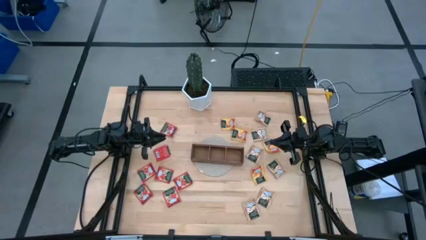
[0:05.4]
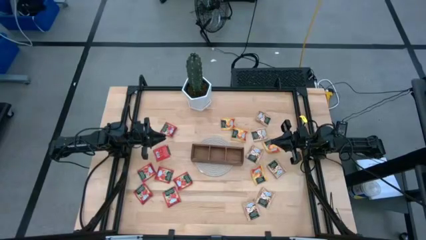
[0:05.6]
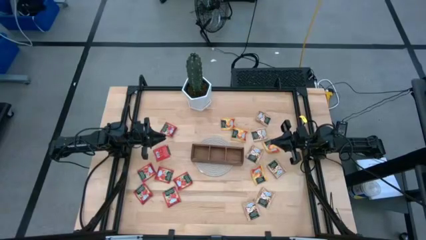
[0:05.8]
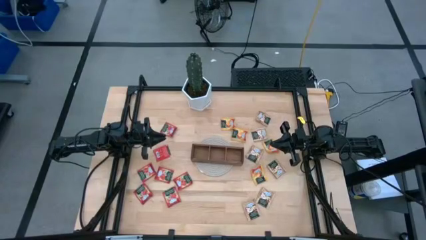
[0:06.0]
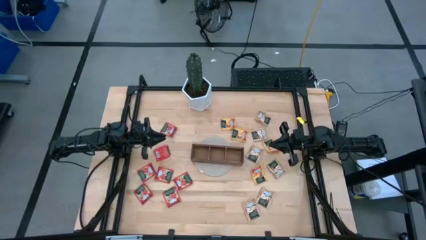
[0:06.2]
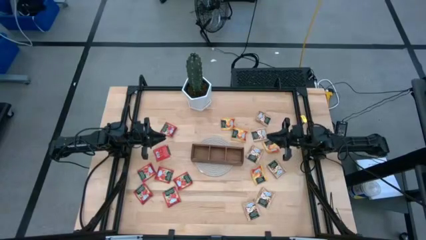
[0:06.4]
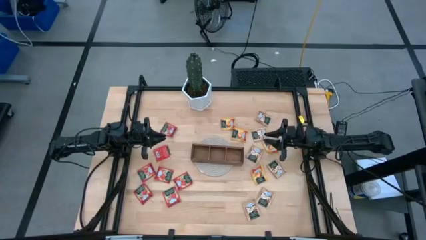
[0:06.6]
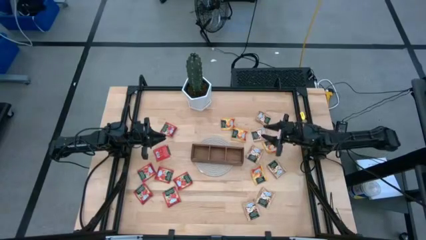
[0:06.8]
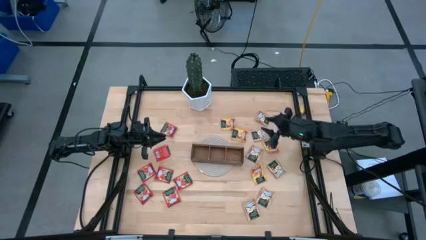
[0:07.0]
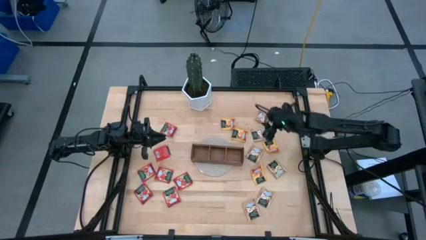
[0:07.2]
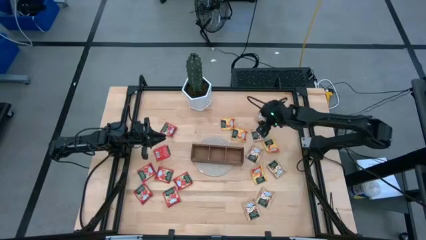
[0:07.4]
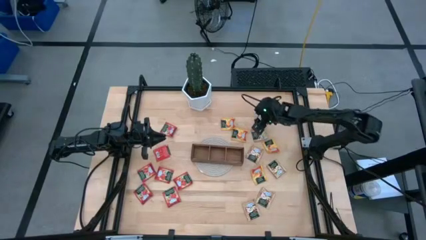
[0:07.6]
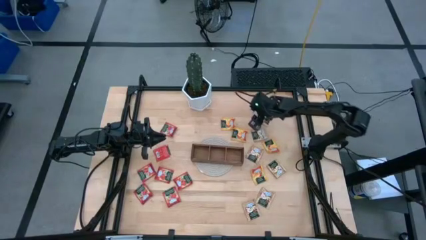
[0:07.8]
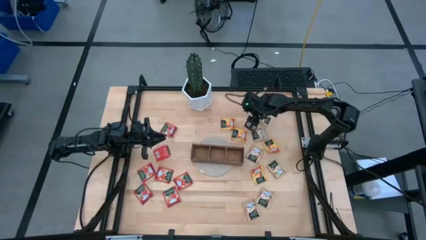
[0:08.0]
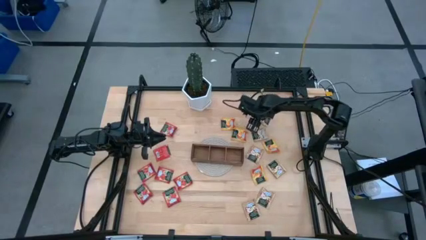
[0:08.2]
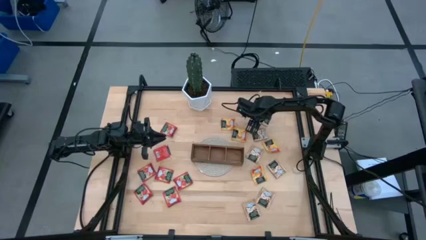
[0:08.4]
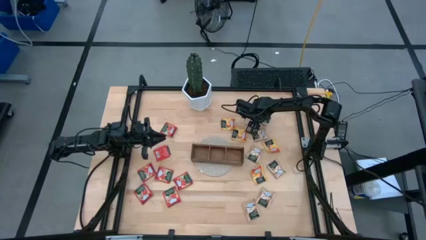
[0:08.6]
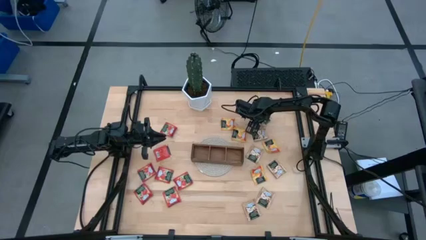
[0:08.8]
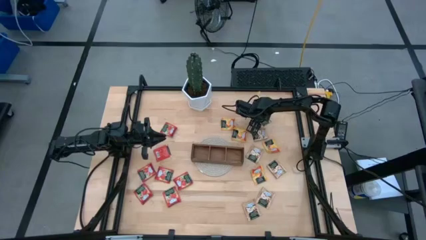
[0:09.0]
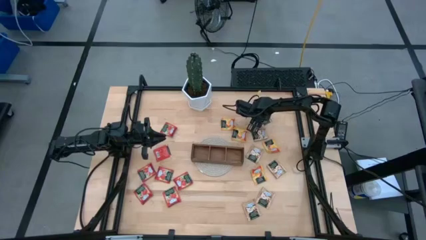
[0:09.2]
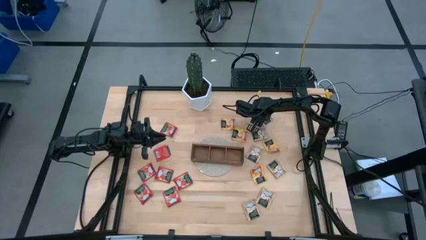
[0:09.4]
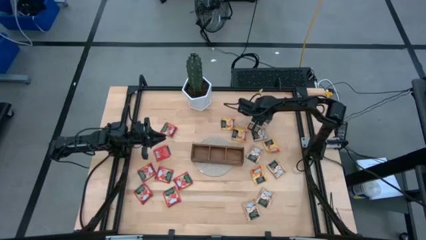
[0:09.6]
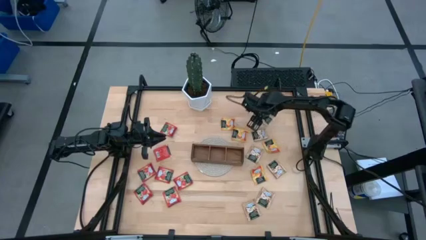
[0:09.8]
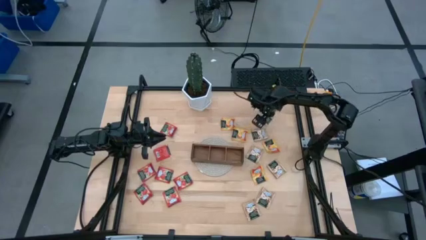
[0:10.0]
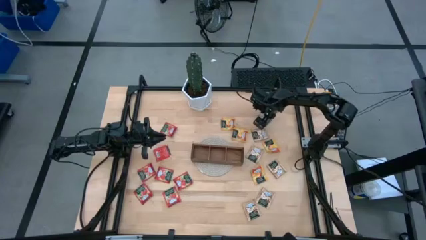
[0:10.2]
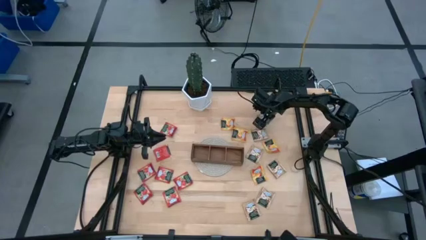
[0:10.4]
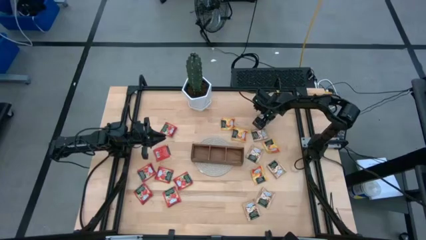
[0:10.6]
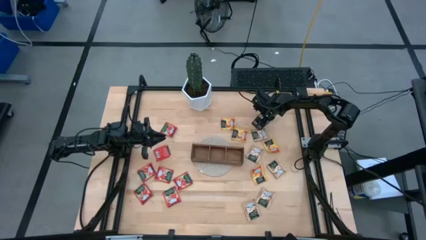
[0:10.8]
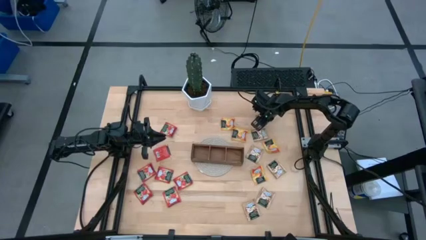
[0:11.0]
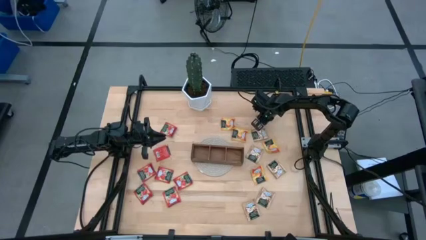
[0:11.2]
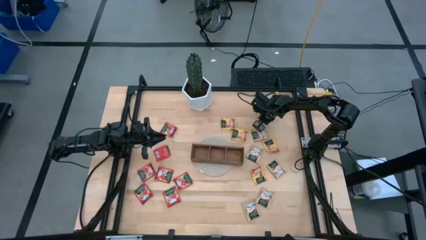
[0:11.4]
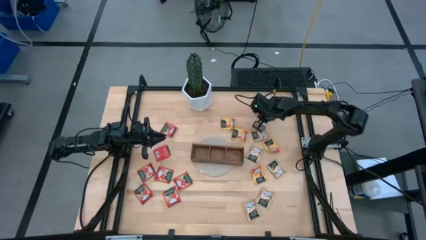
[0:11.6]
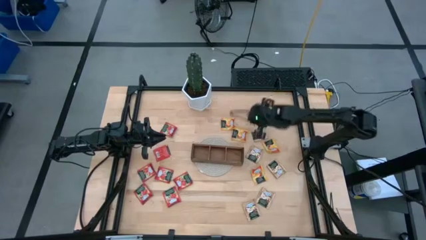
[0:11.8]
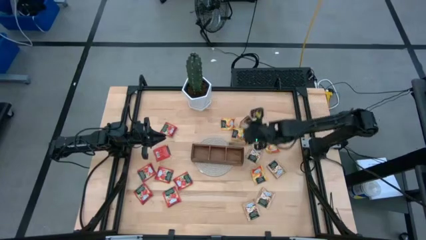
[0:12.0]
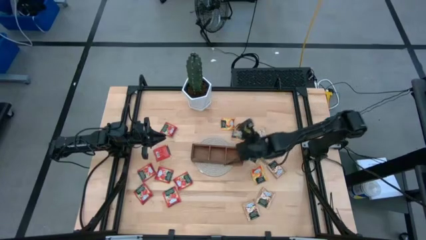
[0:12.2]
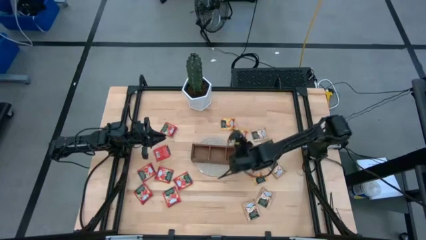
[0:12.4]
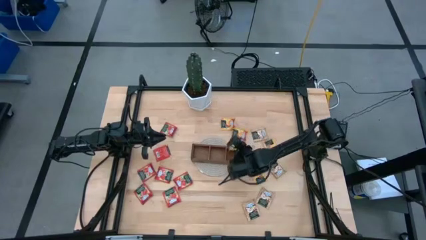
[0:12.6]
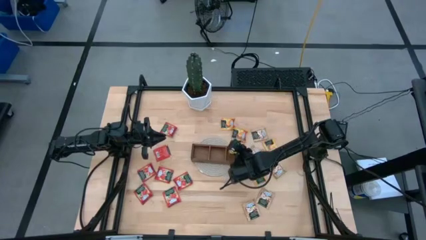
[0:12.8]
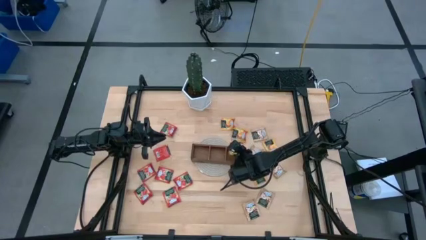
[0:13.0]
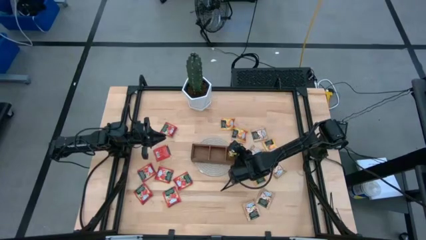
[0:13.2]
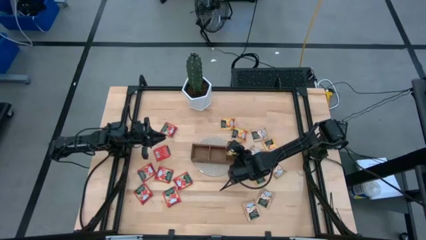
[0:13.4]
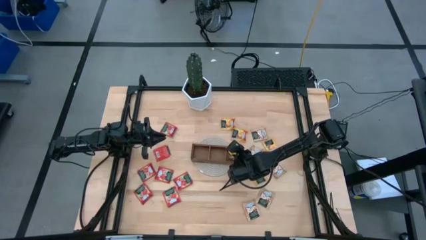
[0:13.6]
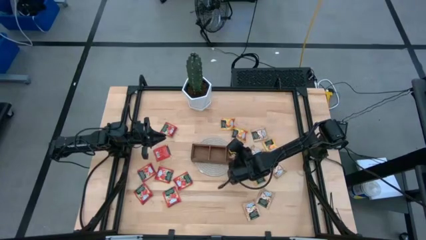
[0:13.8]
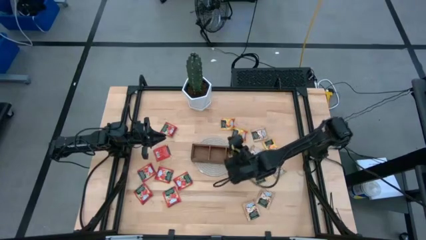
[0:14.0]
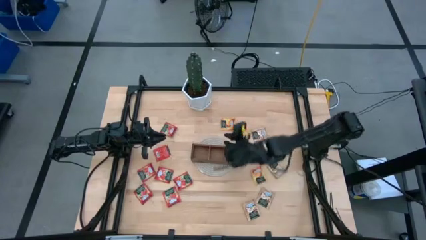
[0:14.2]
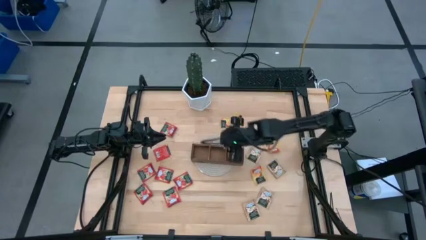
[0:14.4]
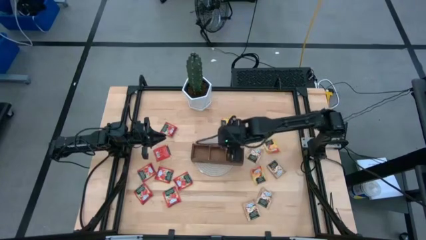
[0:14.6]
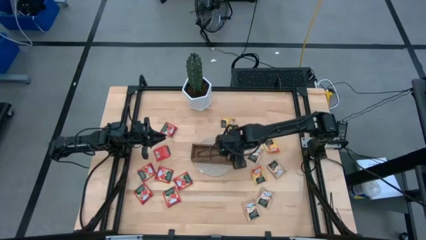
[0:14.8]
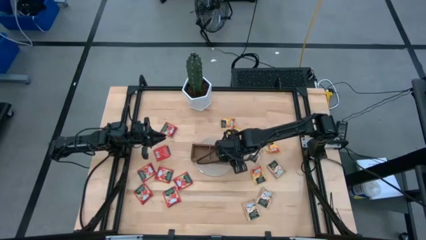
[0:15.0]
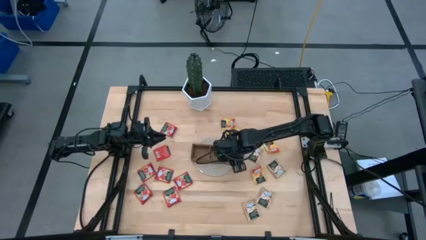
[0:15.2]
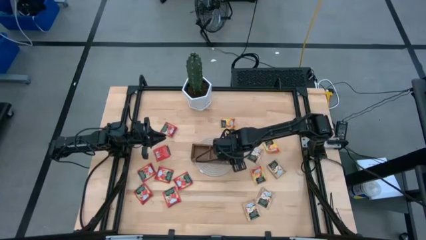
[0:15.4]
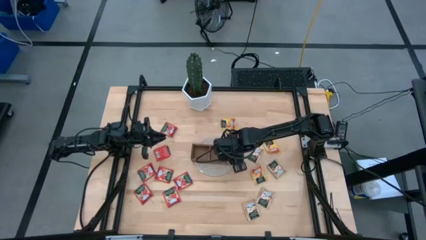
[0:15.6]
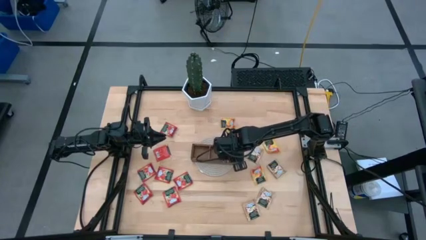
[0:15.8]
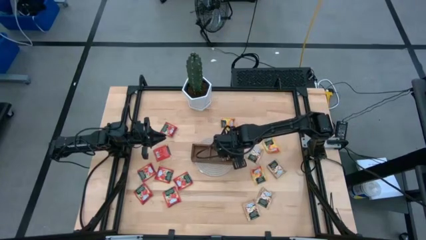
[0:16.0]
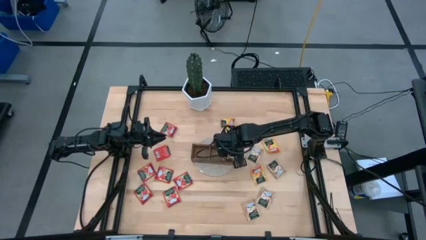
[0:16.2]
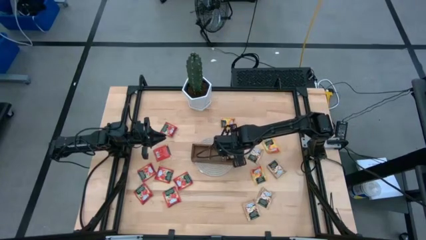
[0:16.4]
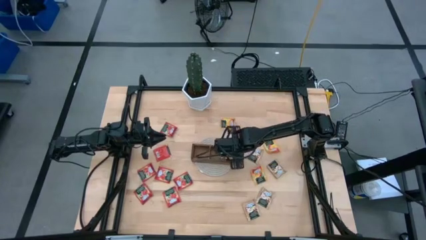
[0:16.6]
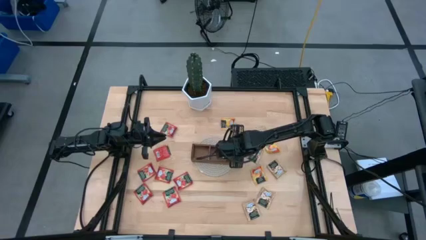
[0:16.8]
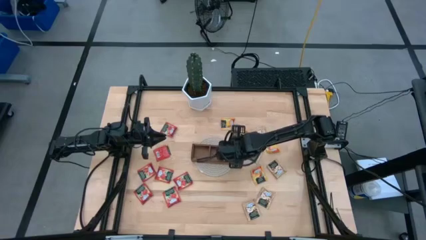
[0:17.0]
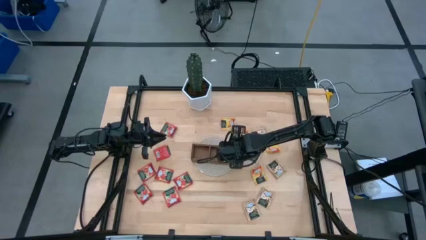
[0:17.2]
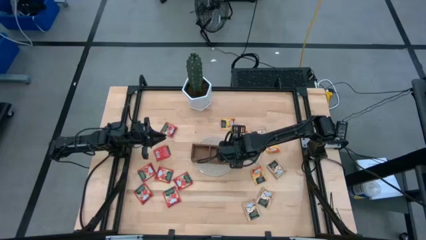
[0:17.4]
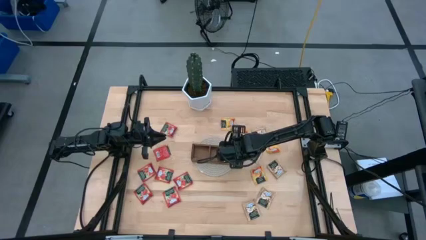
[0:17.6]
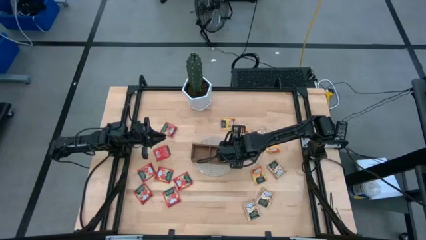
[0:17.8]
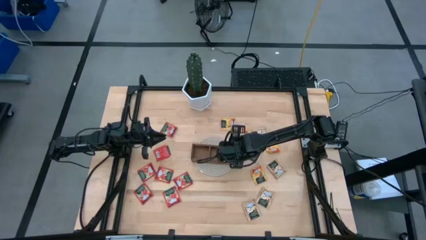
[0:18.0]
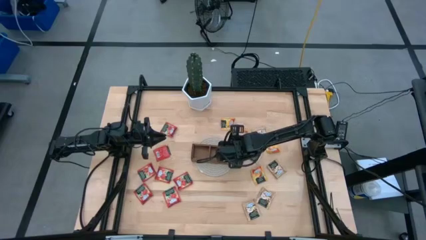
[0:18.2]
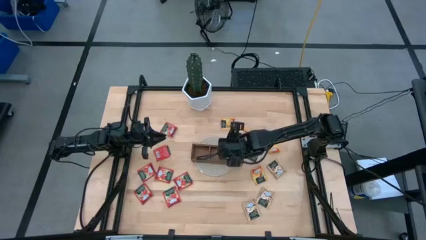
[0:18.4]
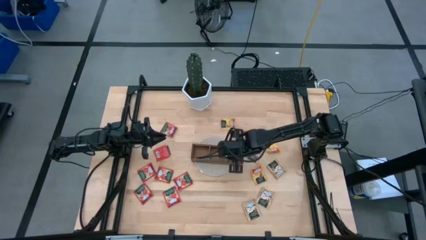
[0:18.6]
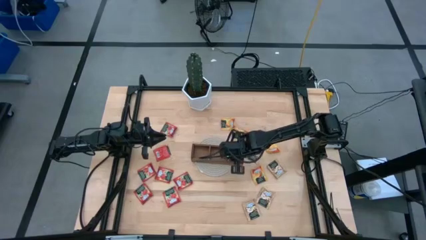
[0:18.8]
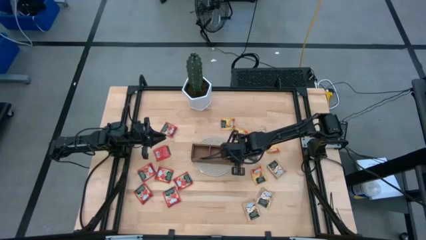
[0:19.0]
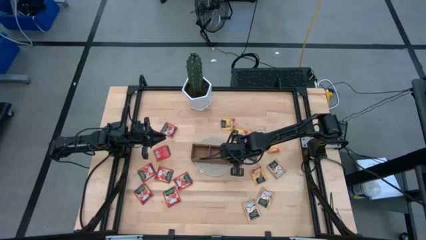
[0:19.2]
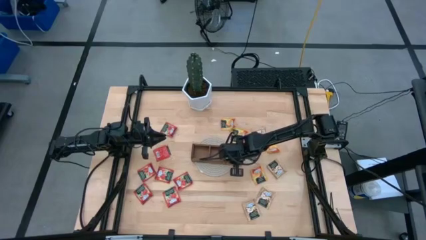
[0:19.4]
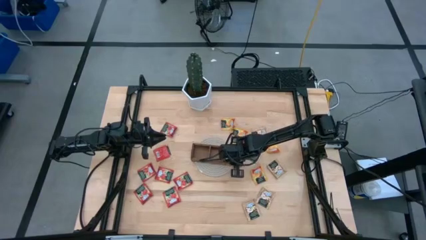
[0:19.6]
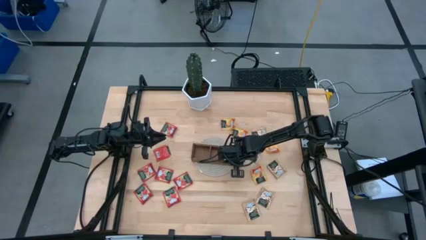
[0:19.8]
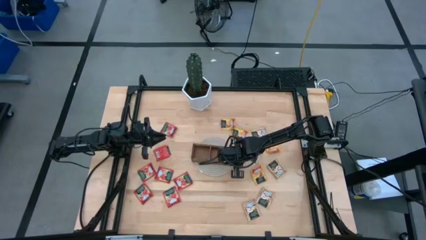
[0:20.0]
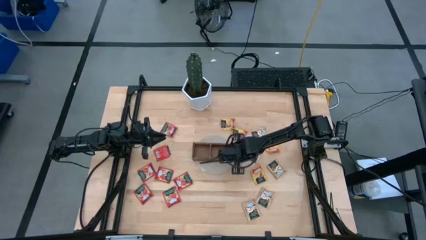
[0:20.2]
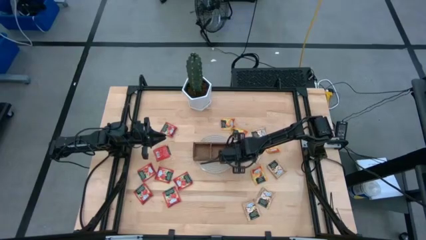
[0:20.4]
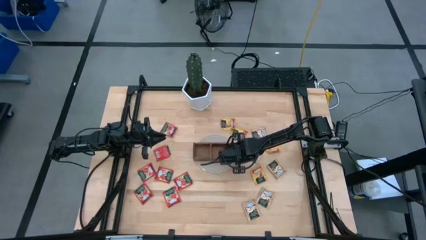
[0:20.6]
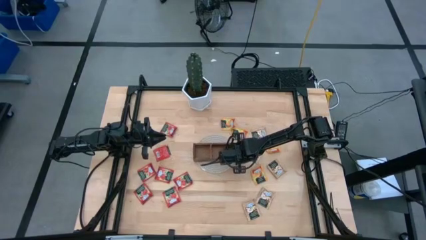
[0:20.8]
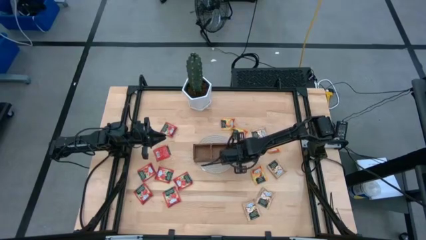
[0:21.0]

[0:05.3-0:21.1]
Task: Pick & Place Tea
Put the brown tea bag into the right section of the wooden organizer

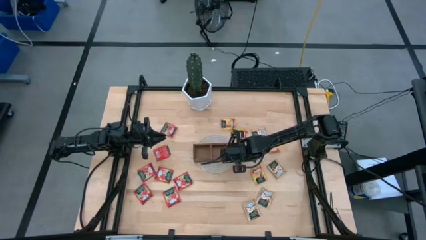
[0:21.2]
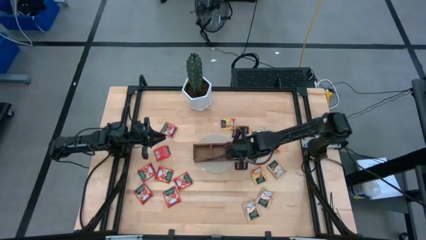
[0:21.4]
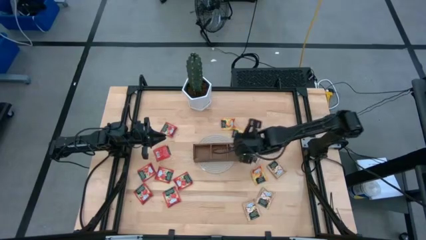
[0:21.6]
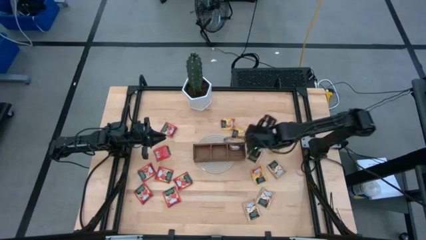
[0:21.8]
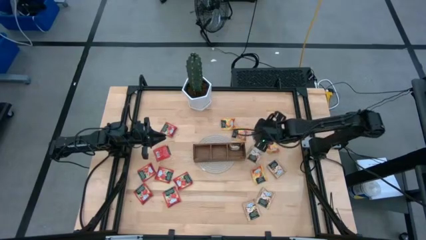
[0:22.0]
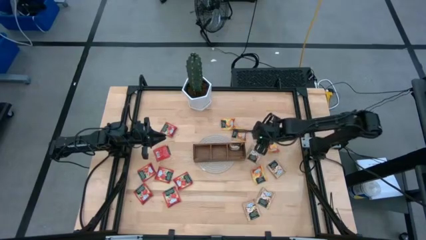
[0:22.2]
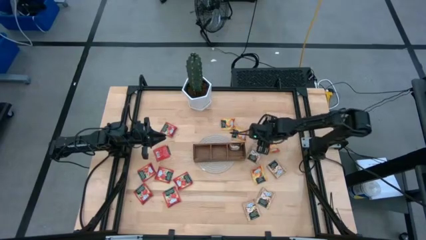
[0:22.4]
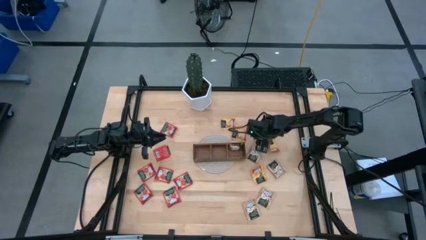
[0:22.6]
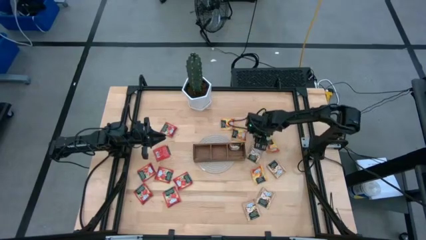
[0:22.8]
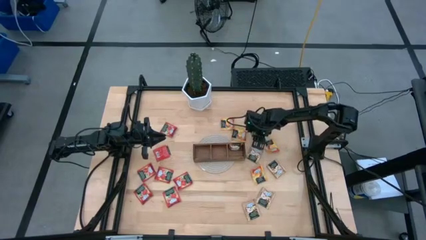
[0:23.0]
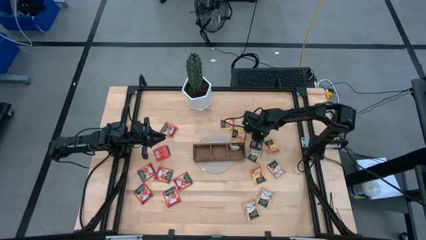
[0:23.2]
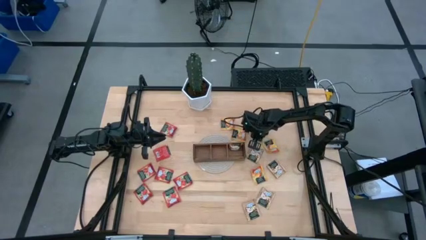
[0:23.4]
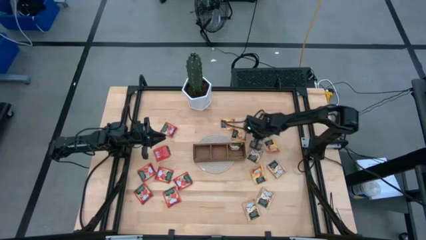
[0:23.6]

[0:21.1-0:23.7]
Put the brown tea bag into the right section of the wooden organizer
